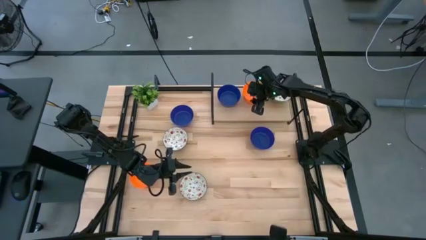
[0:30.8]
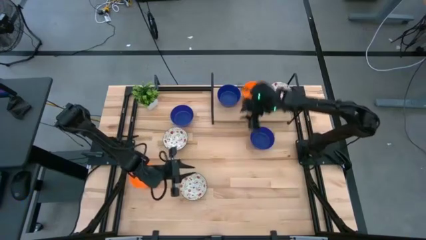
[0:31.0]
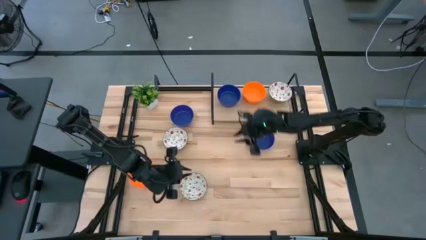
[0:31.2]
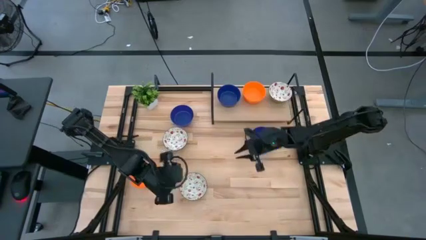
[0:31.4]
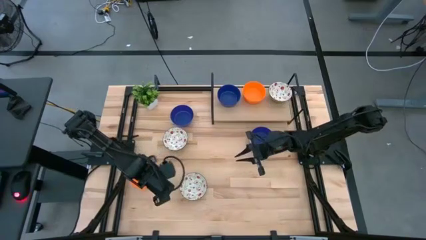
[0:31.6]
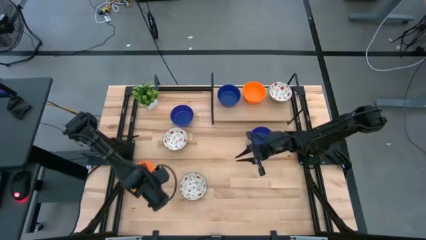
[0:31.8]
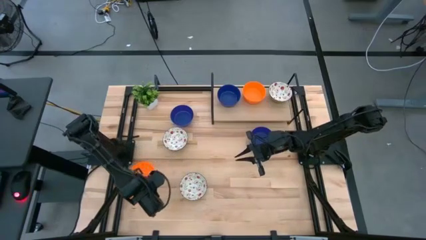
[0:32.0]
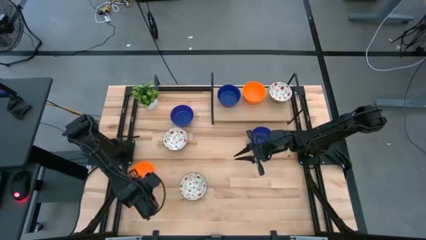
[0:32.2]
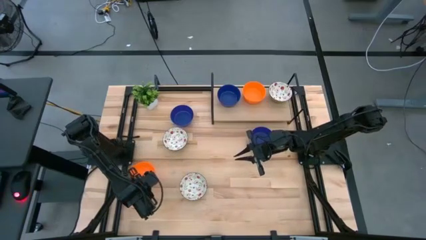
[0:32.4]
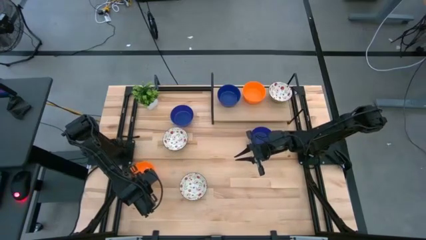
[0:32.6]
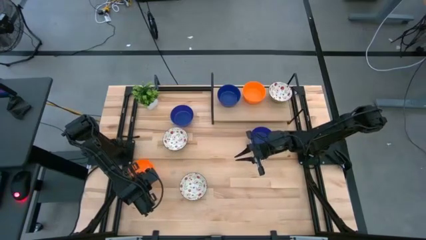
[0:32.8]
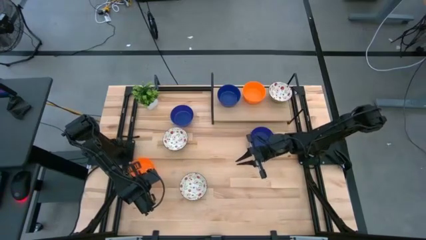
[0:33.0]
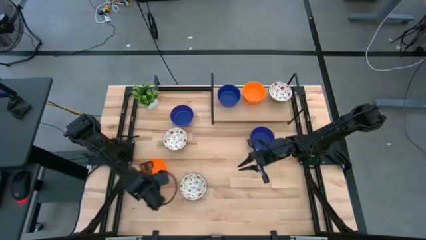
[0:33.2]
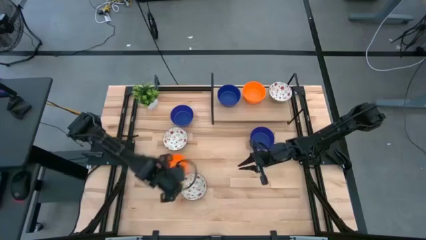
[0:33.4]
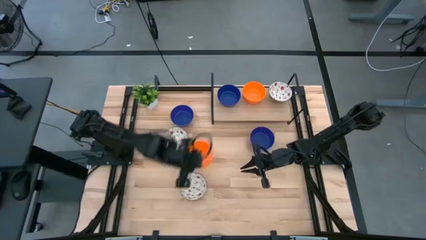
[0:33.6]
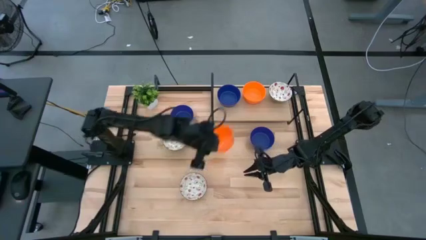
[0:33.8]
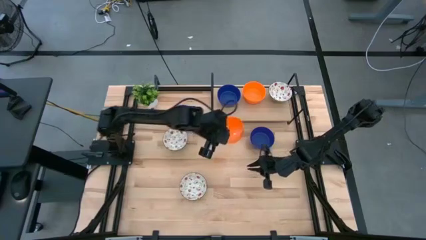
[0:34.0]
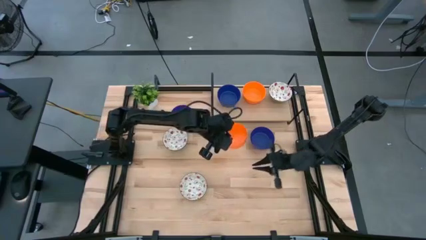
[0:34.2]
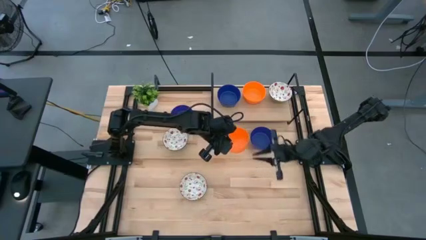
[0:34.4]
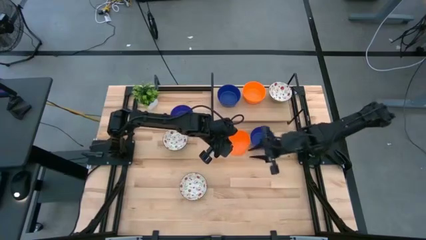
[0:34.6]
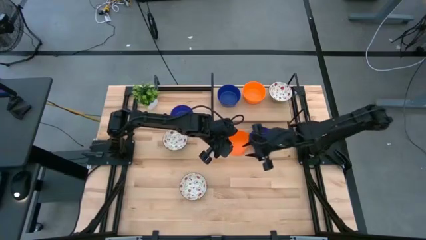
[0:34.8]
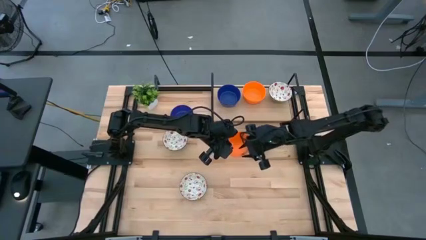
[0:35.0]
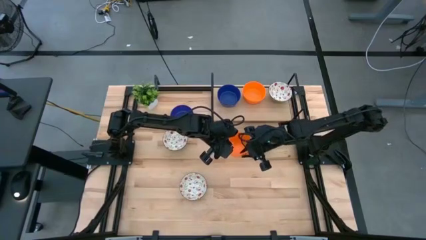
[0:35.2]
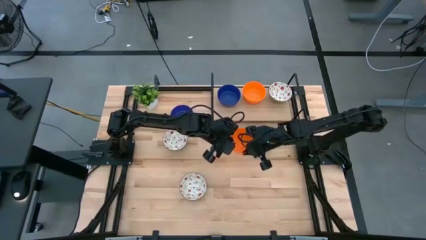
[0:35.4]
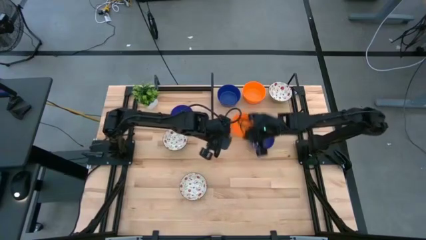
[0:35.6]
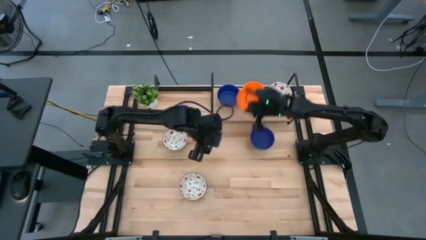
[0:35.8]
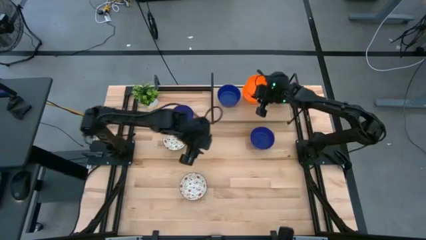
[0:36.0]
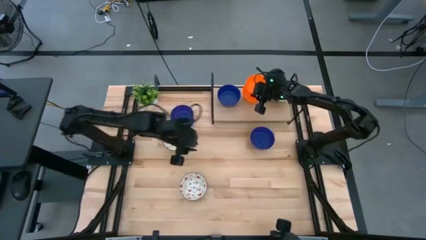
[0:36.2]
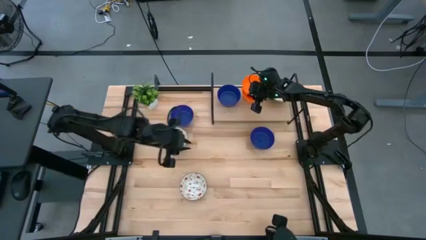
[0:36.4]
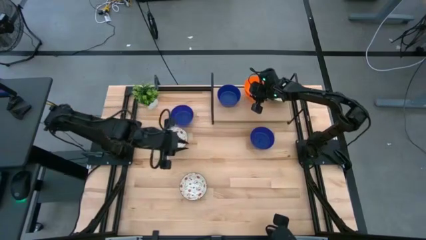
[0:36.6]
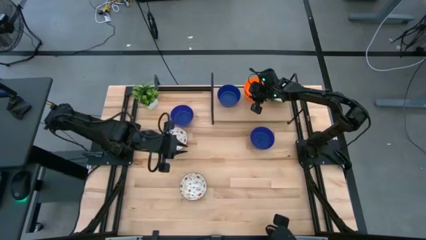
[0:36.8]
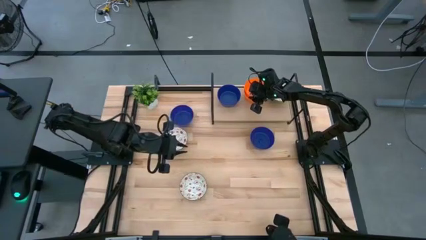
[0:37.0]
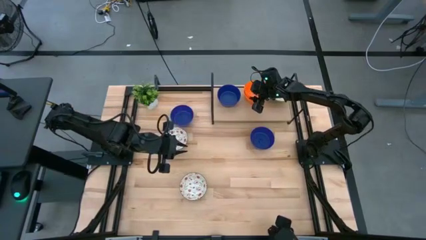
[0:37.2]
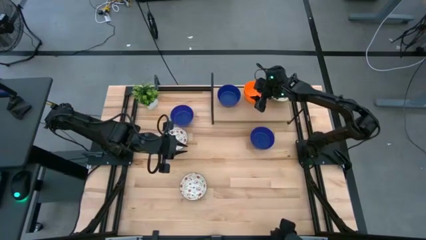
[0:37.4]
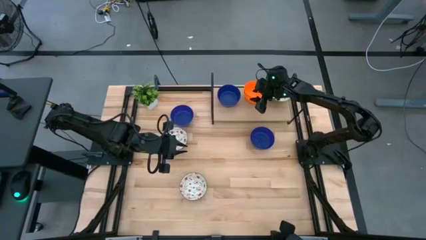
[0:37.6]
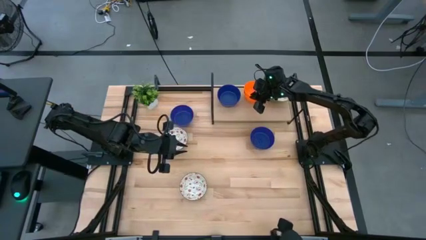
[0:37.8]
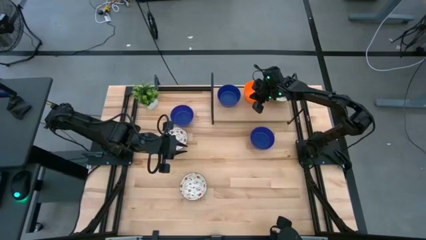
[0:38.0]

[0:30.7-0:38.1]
Task: Pick & Place Mini bowls
Stack the orange bowl on top of the other orange bowl on the shelf

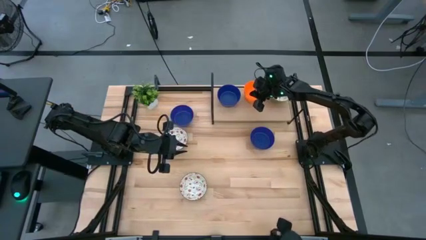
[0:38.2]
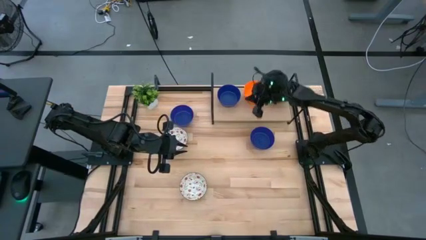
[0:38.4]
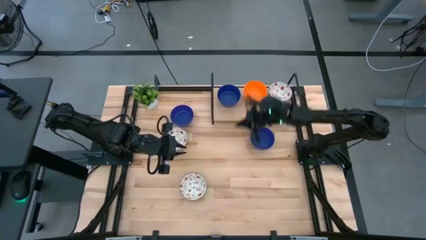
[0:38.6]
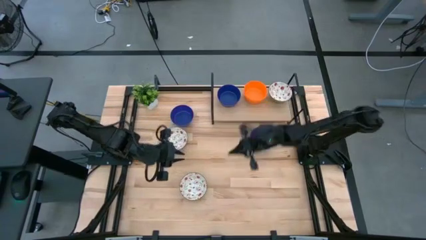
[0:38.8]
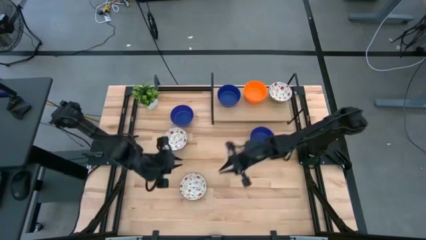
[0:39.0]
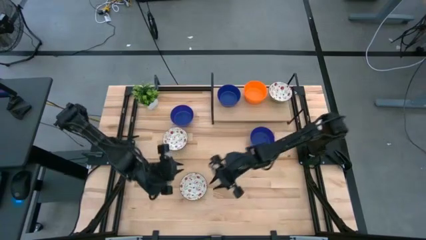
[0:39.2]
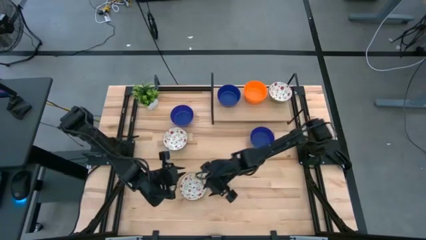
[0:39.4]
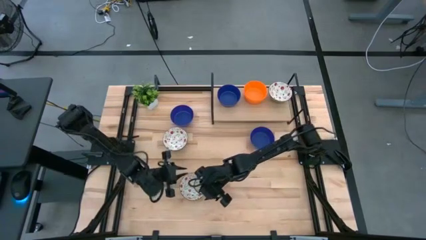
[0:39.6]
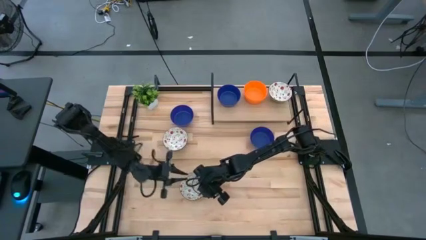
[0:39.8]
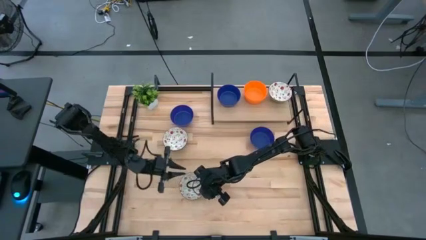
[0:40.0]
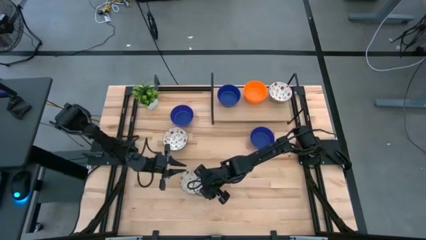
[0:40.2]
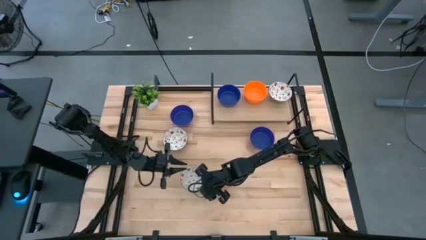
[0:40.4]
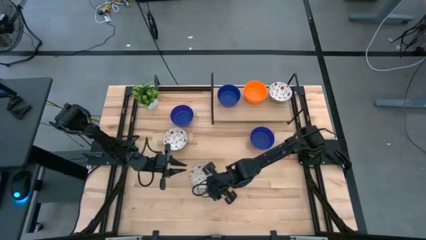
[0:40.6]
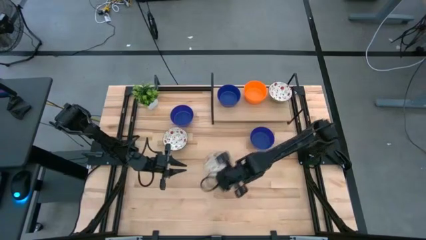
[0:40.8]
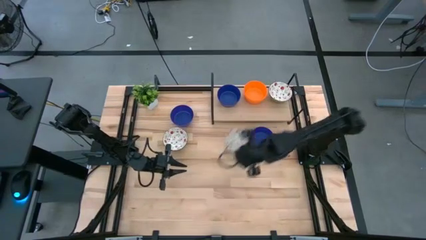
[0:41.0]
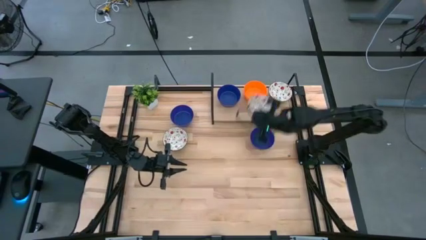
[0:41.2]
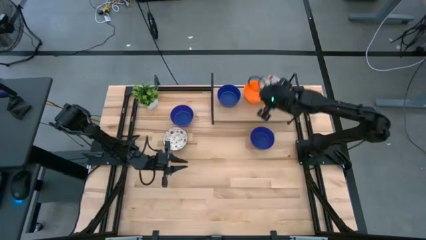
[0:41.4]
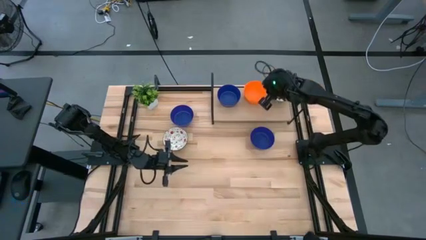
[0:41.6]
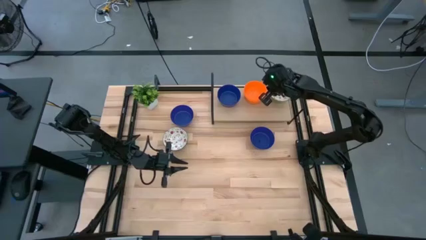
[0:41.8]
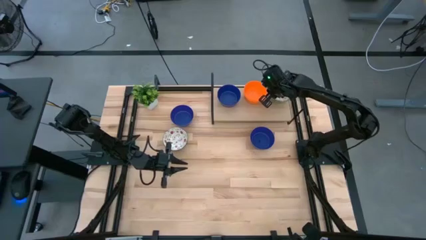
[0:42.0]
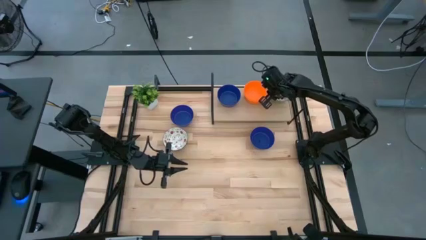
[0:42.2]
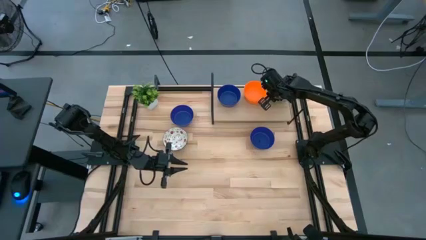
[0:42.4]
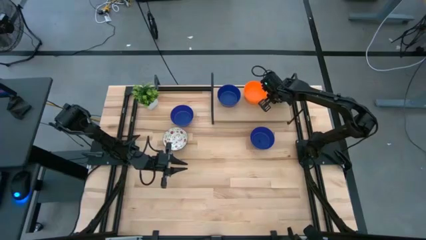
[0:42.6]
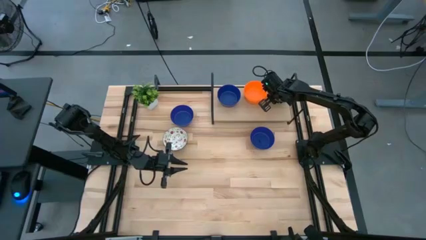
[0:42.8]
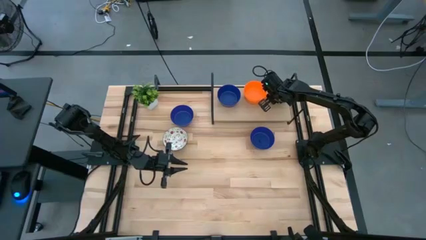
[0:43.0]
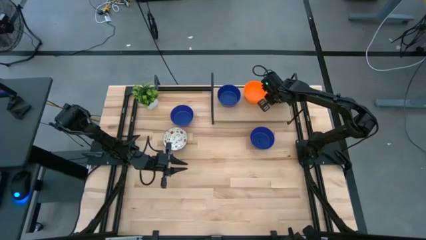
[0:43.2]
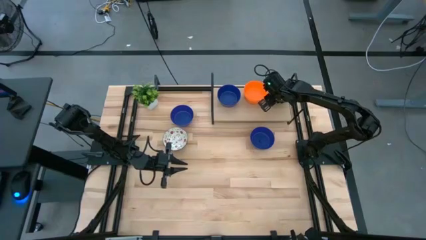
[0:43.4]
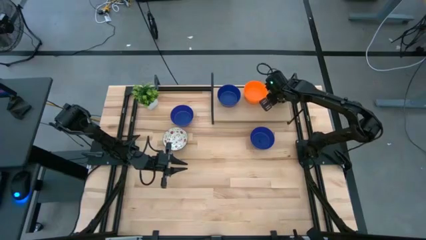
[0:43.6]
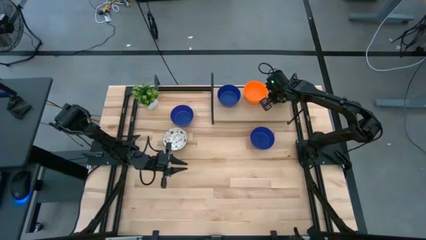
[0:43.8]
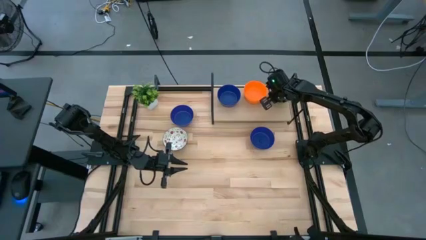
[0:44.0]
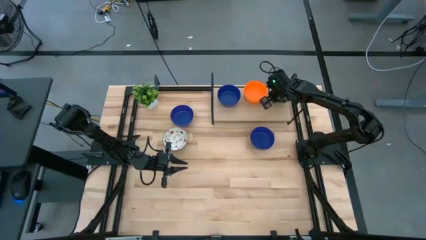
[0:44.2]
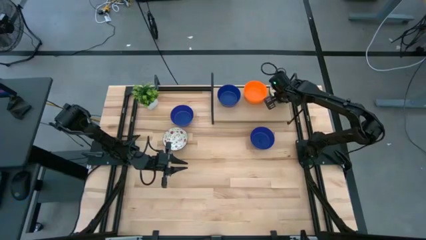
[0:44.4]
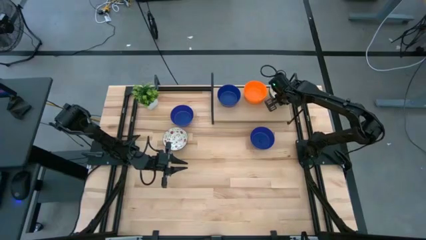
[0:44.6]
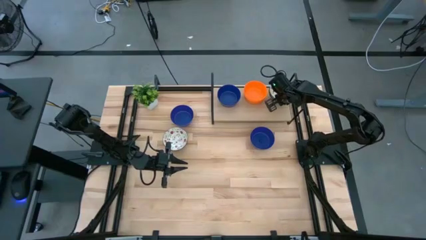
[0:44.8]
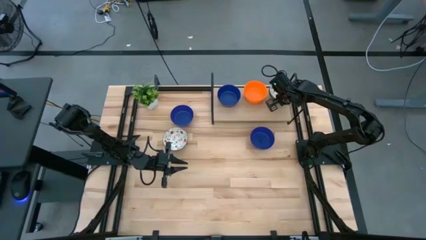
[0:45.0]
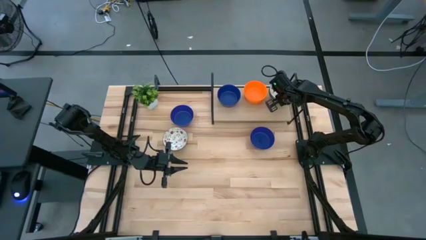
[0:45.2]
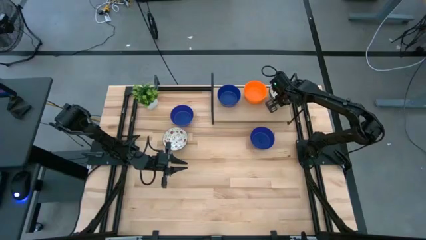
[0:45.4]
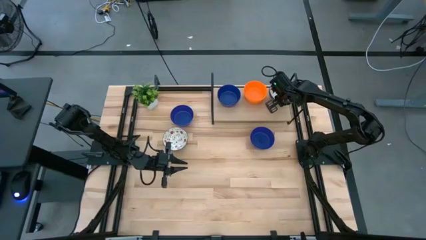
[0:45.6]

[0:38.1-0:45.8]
Stack the white patterned bowl on top of the white patterned bowl on the shelf

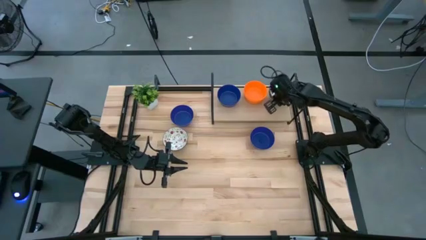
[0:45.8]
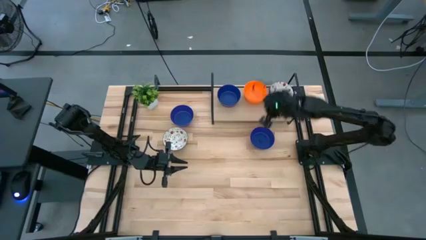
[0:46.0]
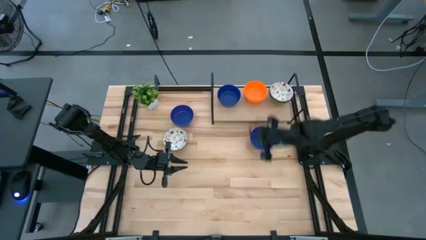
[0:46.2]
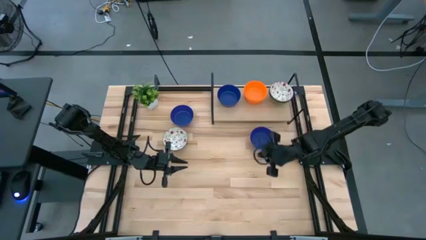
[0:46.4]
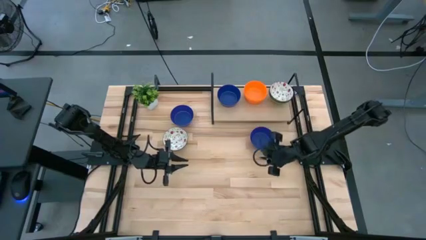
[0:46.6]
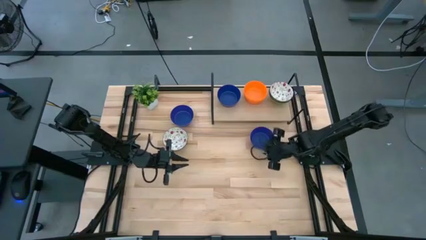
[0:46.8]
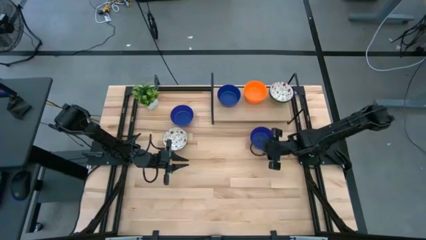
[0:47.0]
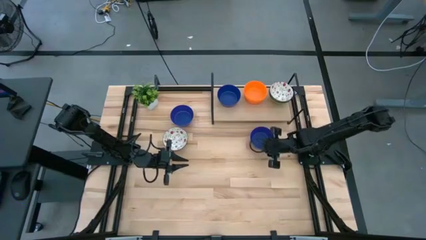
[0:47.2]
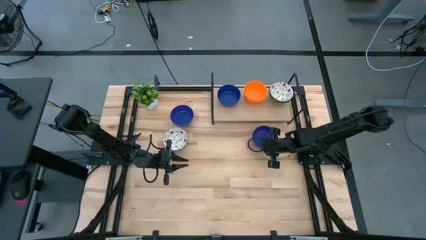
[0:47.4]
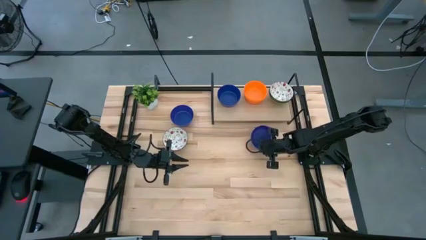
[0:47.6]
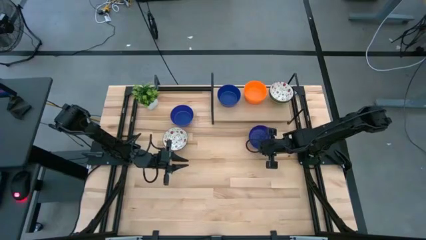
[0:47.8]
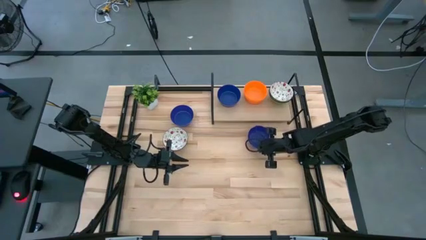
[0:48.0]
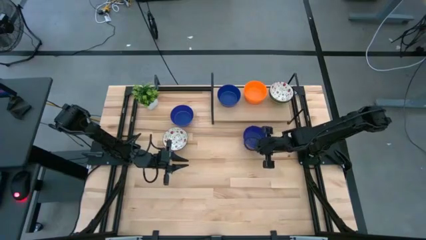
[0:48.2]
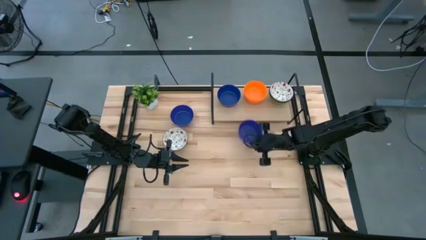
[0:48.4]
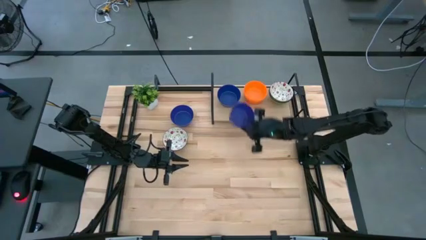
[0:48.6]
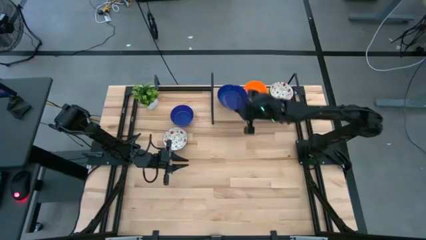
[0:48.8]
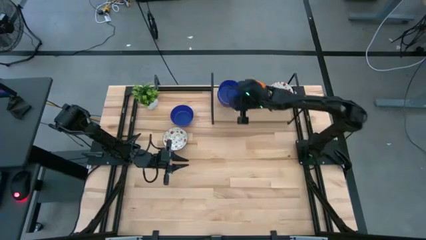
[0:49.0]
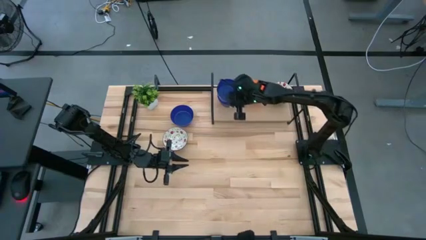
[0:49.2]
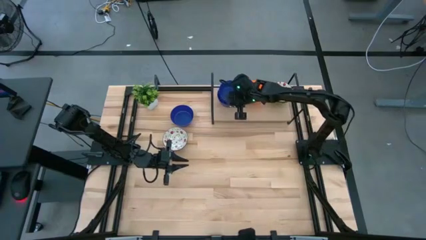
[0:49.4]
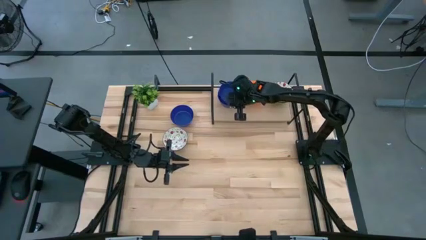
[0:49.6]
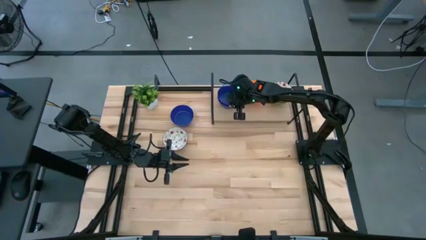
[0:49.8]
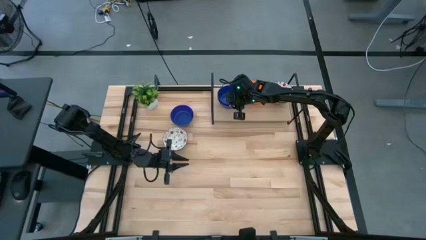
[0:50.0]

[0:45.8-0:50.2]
Stack the blue bowl on top of the blue bowl on the shelf
